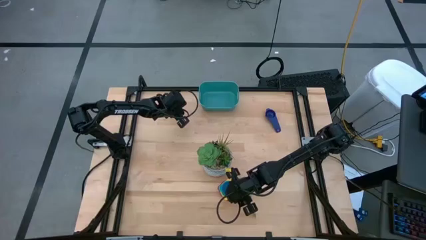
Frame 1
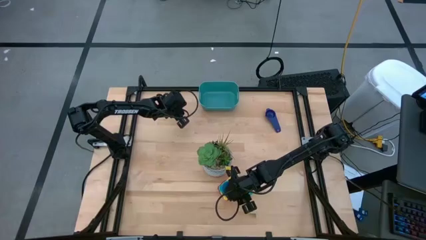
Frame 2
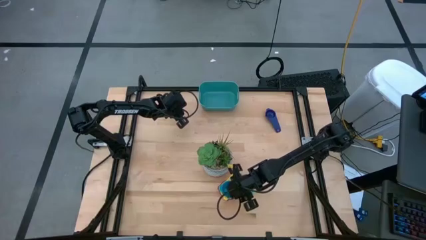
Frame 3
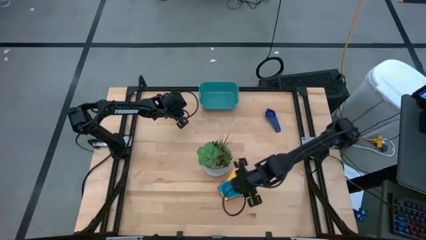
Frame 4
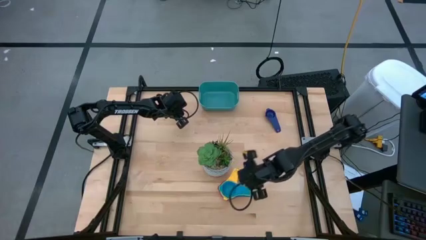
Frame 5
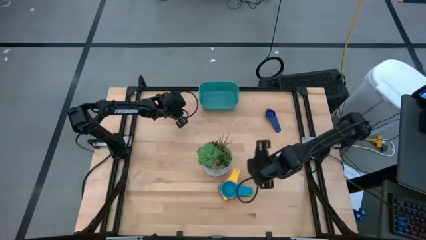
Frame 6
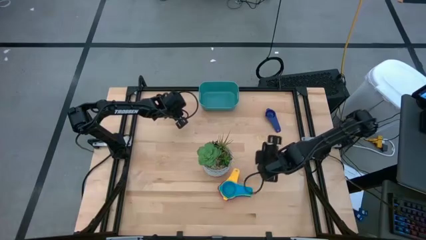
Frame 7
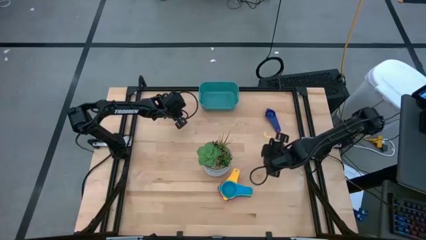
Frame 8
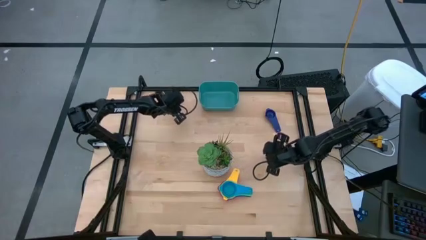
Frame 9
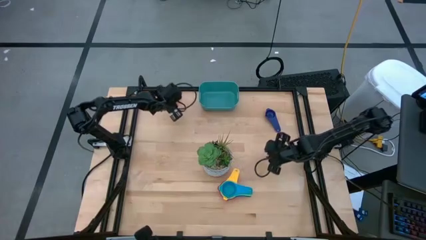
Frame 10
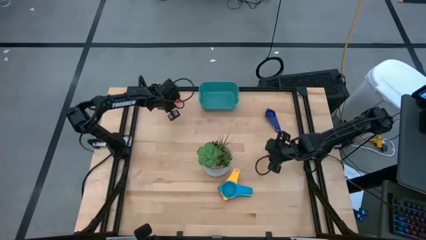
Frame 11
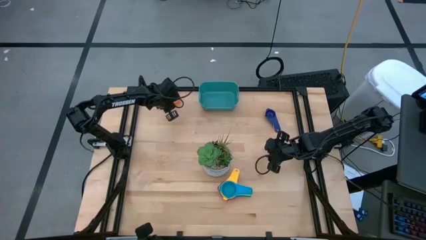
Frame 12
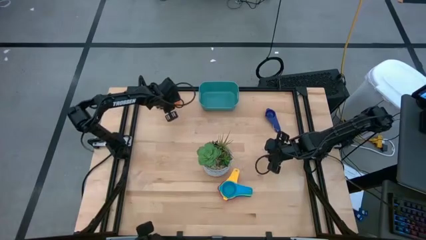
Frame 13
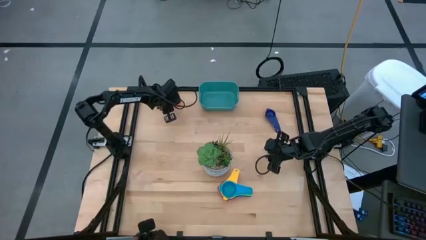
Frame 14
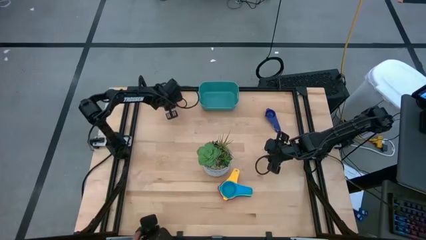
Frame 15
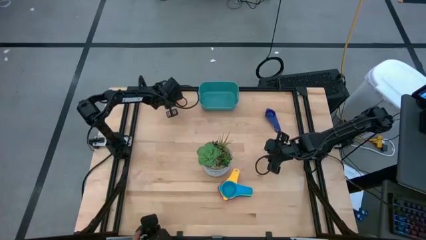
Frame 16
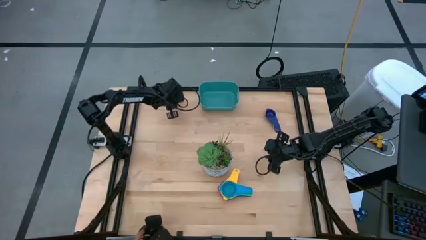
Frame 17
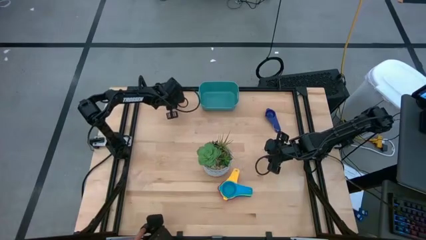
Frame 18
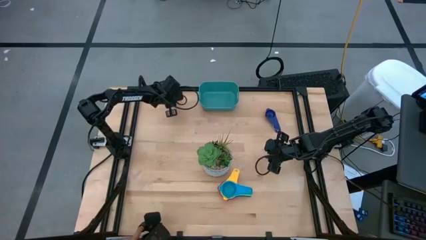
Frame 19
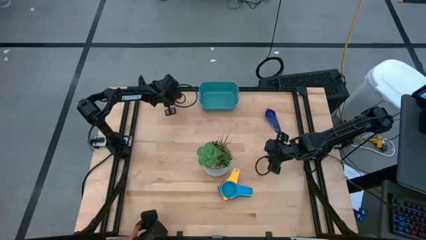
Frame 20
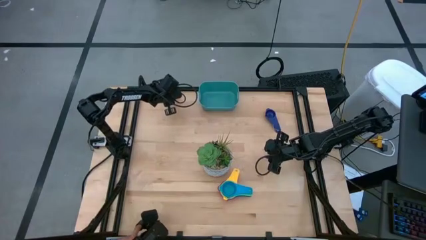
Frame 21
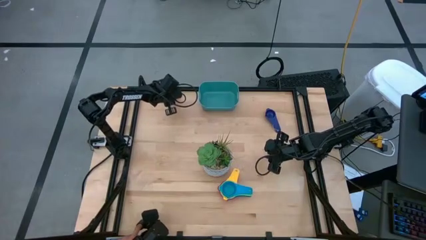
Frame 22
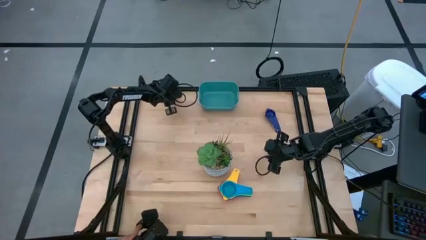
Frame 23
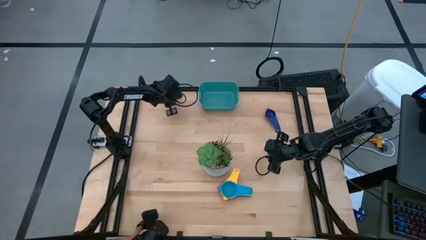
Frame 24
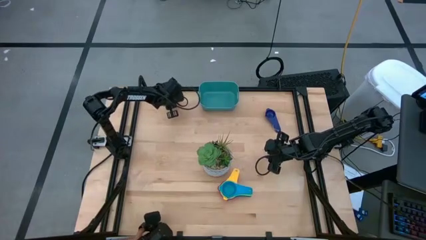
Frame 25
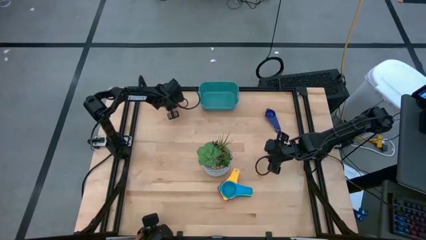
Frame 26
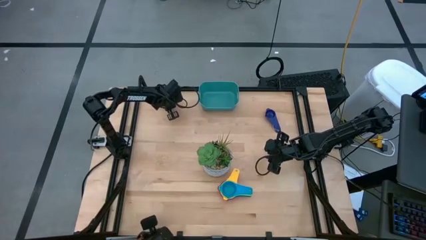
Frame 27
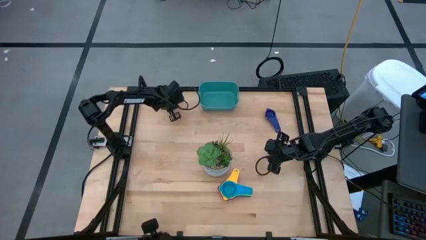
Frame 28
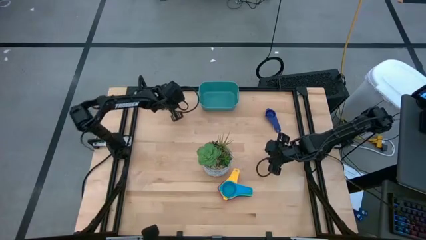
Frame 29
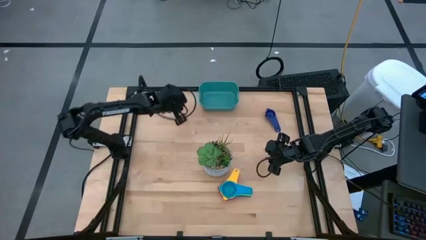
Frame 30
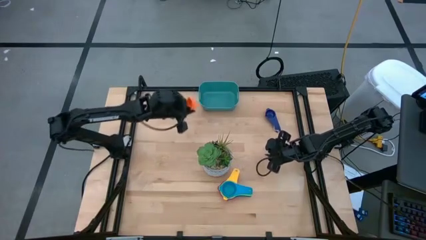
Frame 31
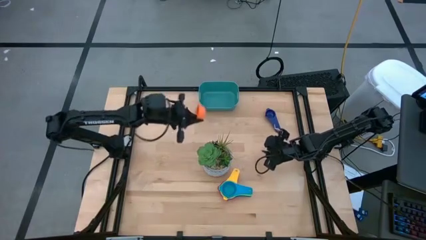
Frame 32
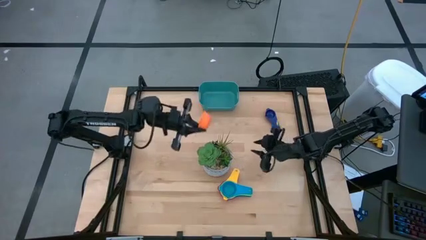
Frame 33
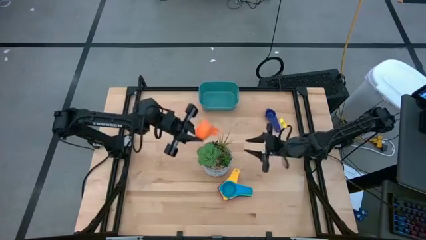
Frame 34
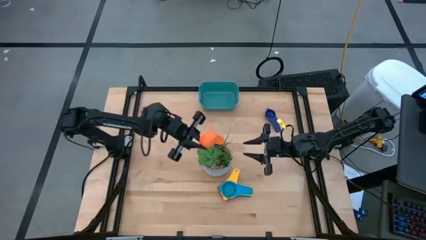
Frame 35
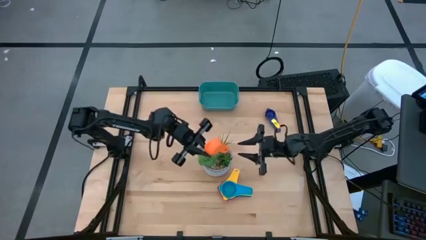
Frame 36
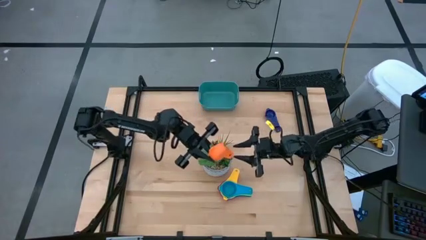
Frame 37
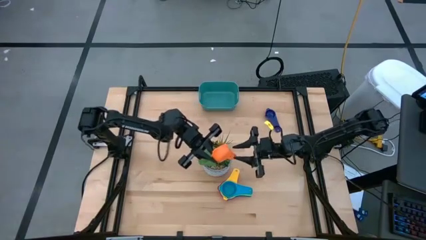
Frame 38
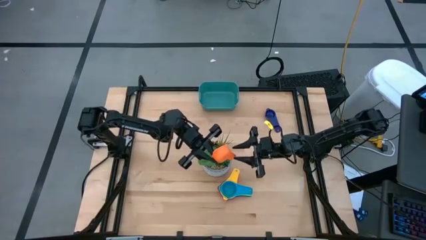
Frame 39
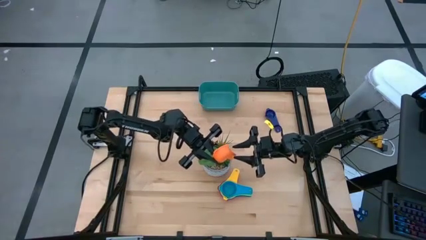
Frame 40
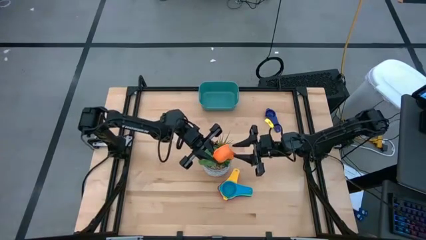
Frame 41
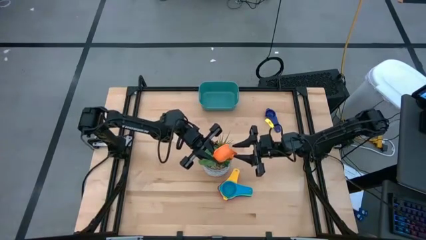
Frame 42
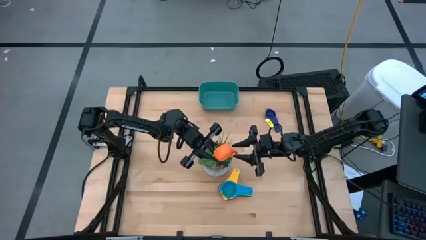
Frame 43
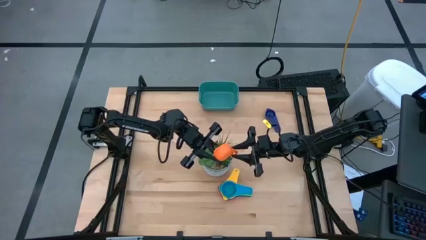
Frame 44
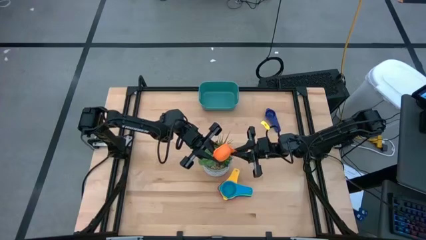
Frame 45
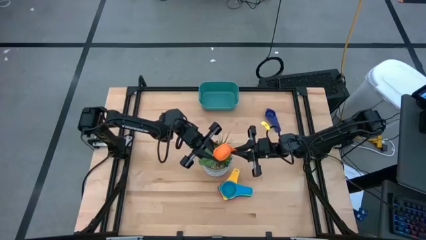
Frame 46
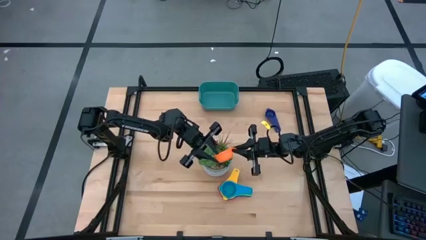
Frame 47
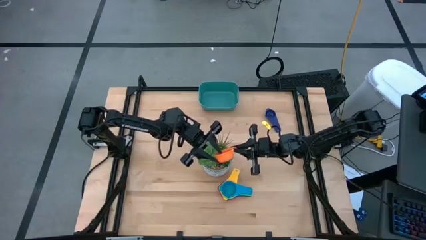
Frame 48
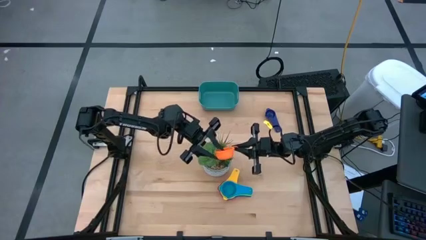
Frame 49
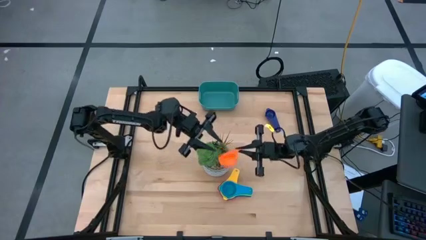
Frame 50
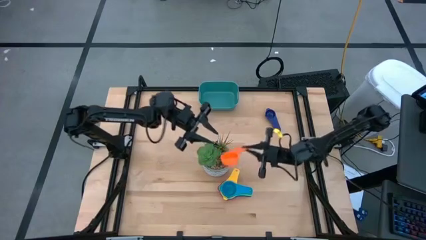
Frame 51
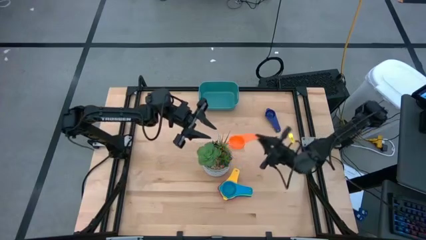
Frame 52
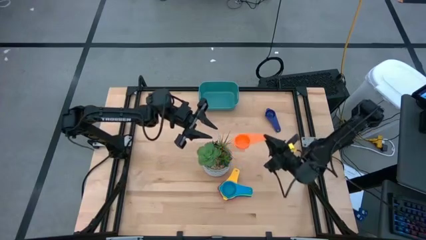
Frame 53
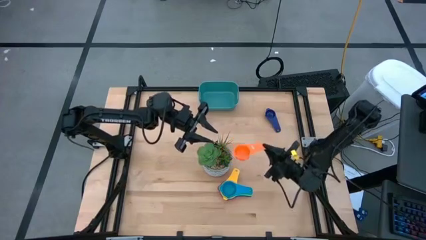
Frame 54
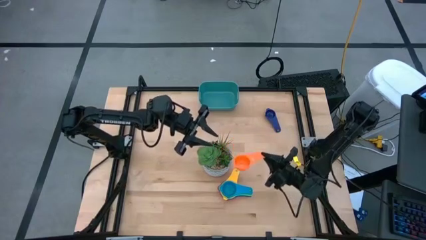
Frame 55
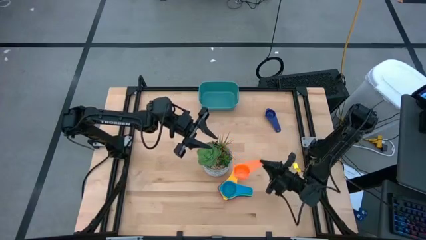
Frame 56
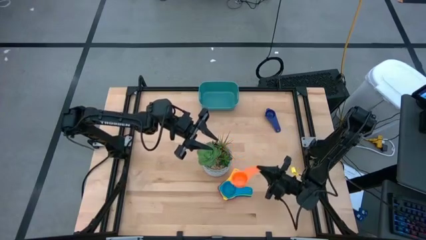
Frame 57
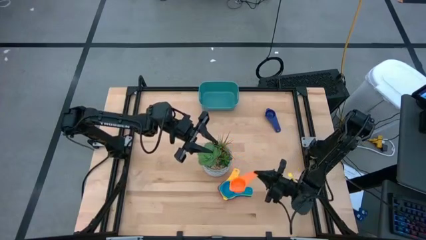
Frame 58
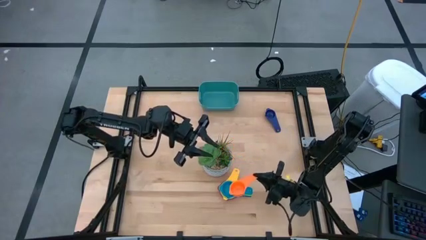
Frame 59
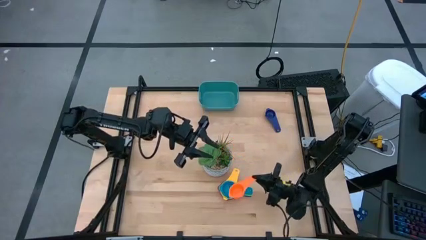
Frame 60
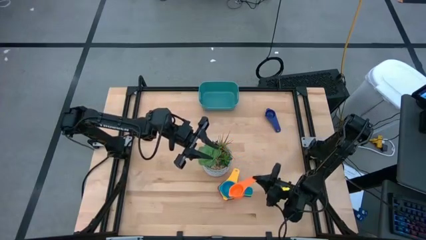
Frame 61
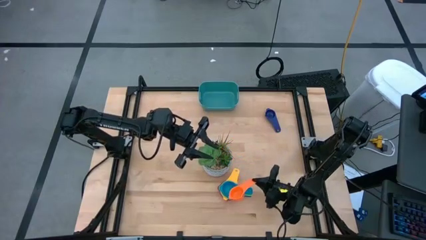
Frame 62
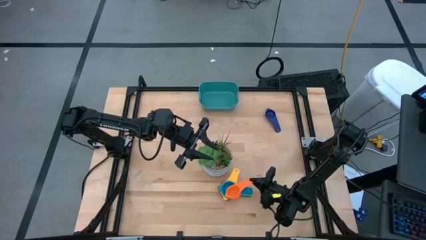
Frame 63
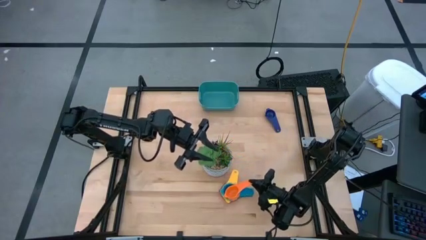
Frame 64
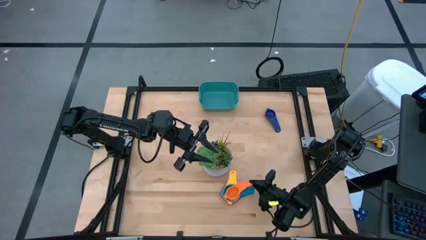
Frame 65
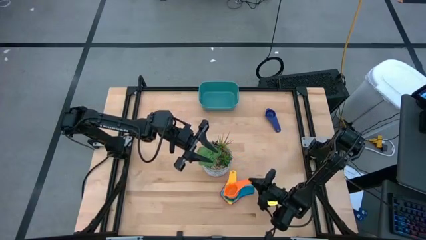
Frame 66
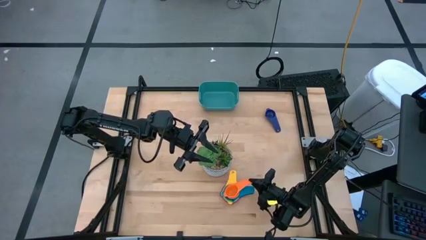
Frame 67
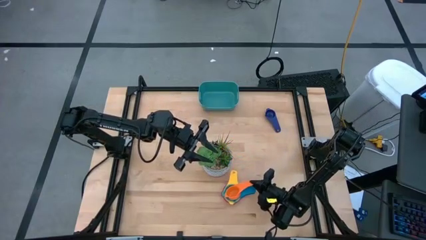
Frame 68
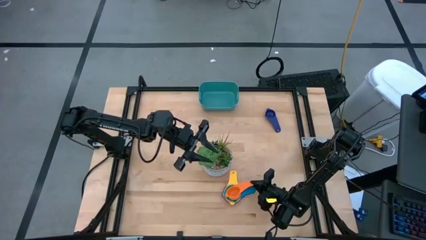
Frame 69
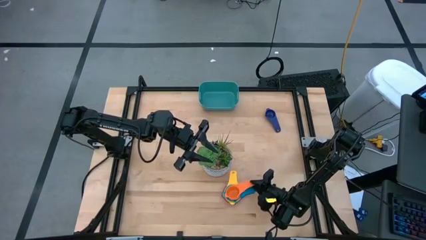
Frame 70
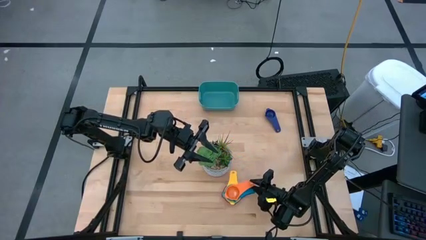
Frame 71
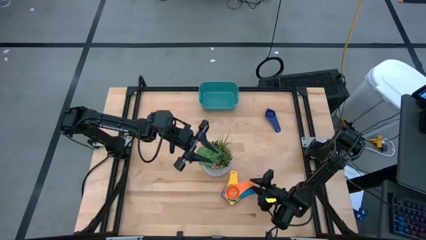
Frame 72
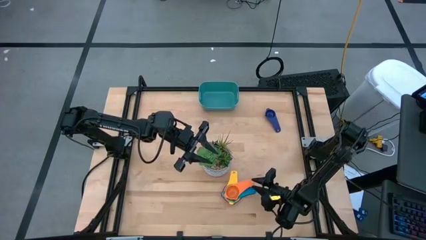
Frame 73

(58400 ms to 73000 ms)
Task: Nest measuring cups in basket
Stack the orange measuring cup on top the light blue measuring cup

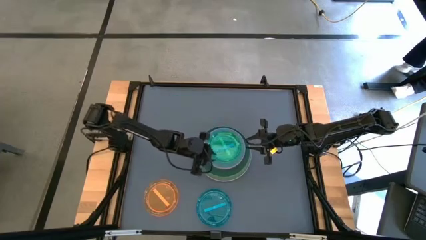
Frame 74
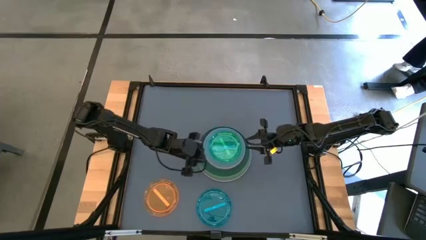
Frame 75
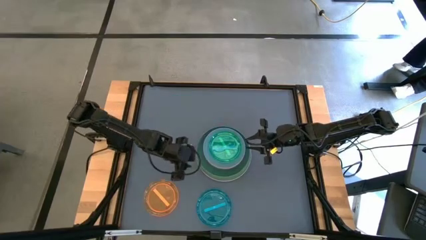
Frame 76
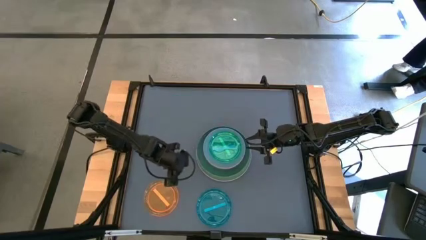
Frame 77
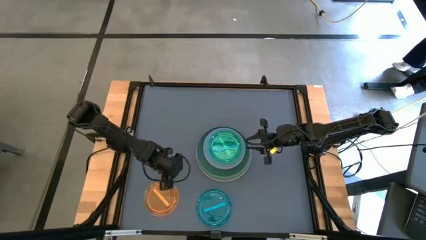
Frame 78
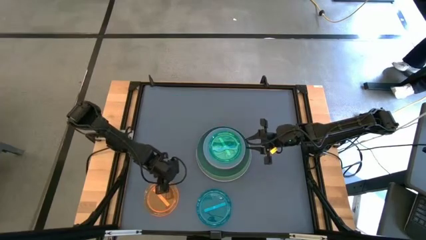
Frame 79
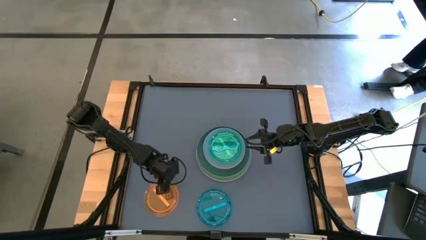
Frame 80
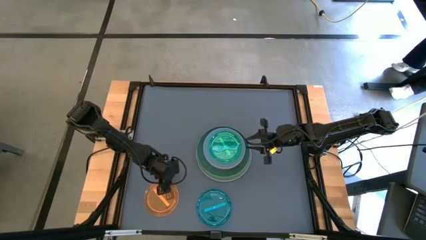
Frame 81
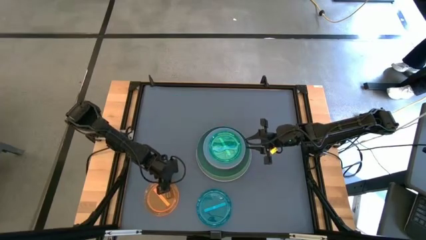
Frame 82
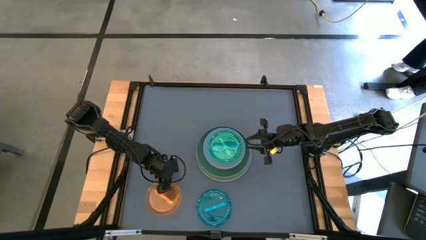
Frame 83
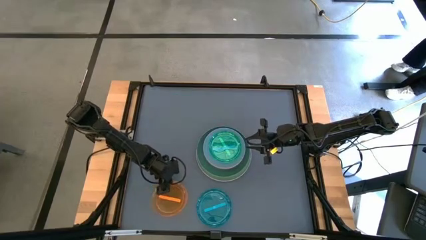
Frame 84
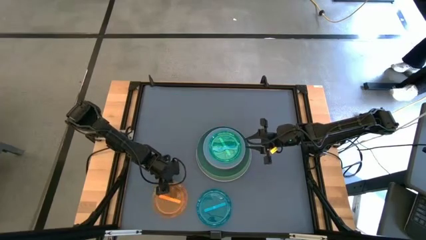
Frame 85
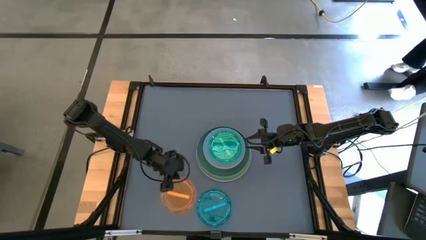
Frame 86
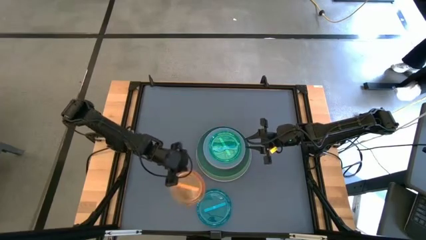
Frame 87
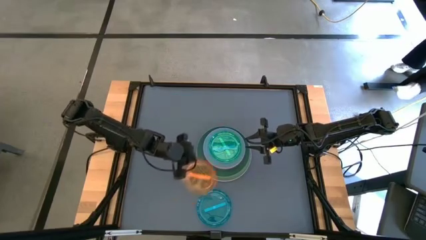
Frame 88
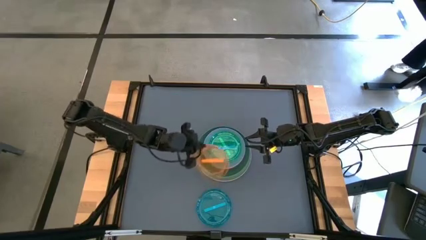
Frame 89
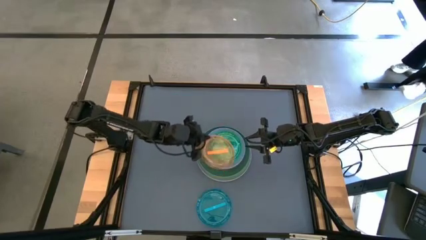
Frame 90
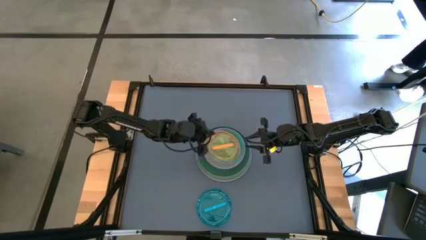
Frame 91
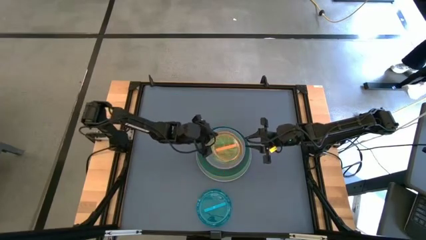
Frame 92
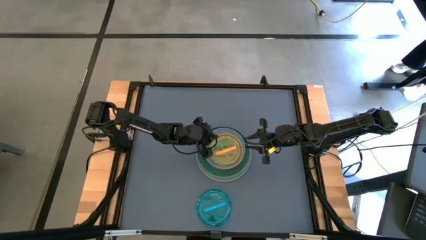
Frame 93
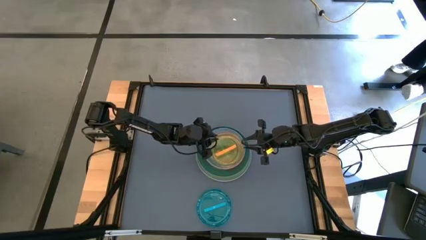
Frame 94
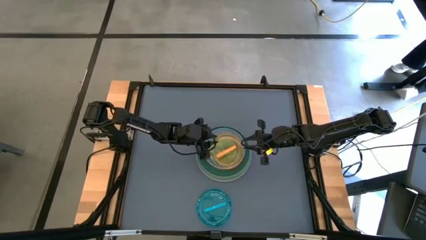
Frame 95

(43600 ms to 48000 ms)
Task: Stack plastic plates
Stack the light orange plate on top of the light blue plate
